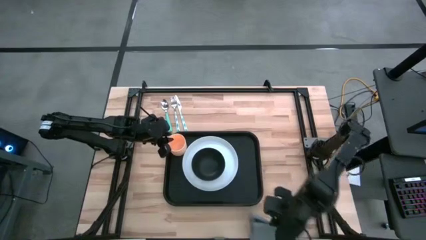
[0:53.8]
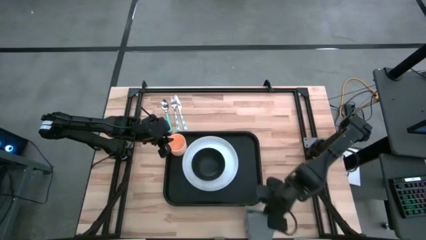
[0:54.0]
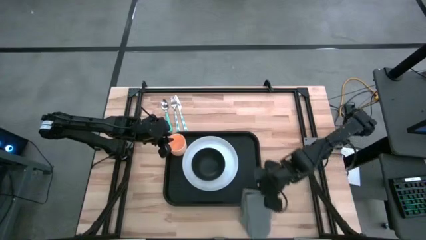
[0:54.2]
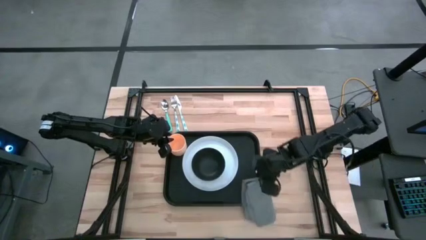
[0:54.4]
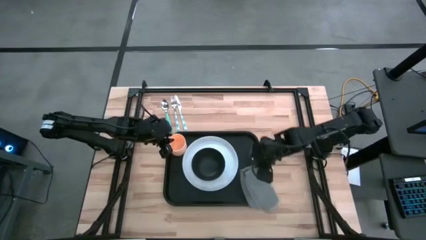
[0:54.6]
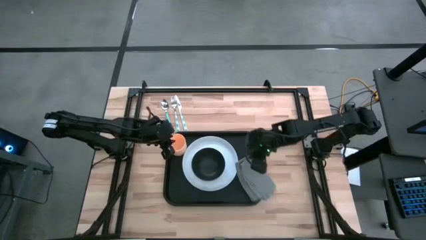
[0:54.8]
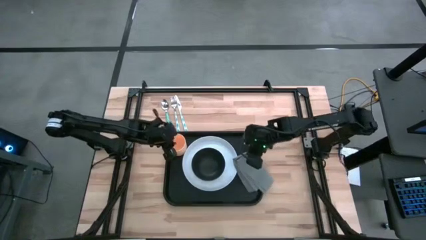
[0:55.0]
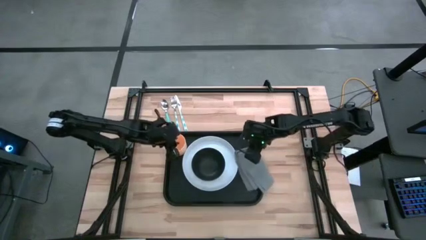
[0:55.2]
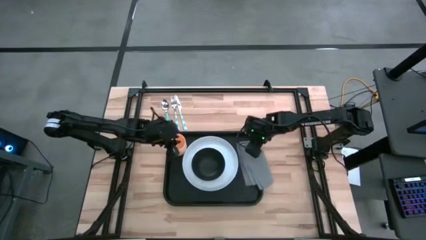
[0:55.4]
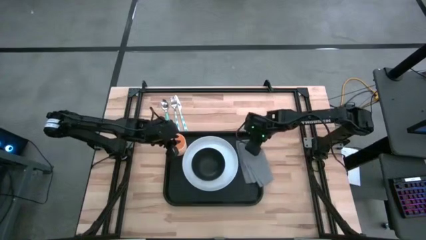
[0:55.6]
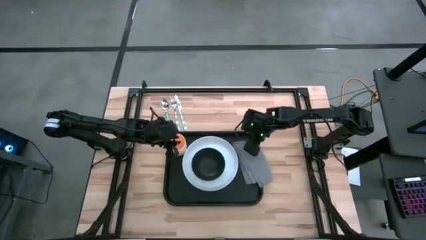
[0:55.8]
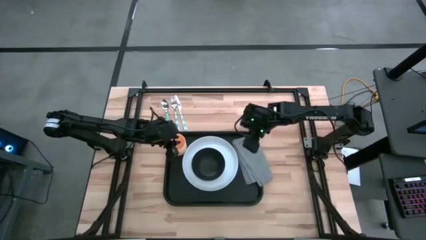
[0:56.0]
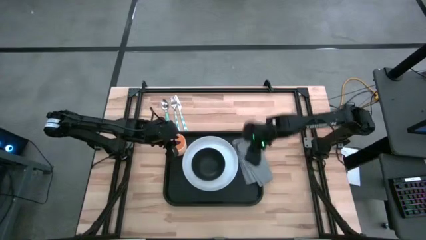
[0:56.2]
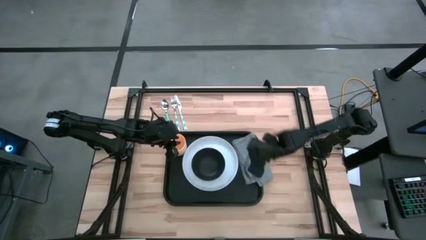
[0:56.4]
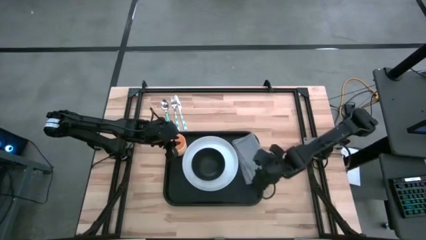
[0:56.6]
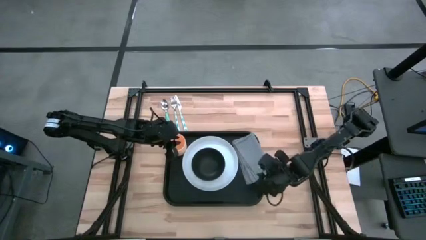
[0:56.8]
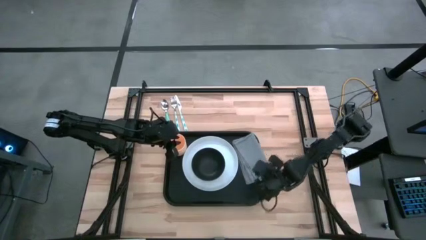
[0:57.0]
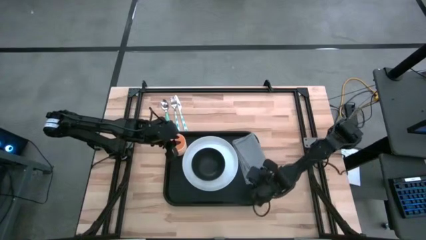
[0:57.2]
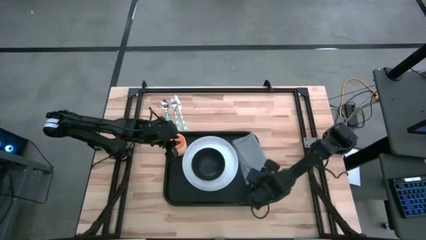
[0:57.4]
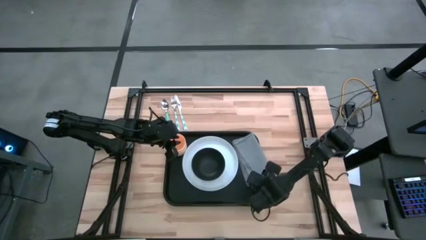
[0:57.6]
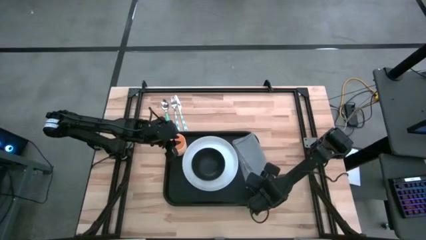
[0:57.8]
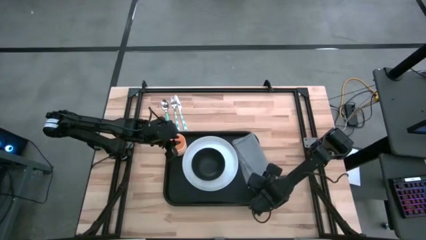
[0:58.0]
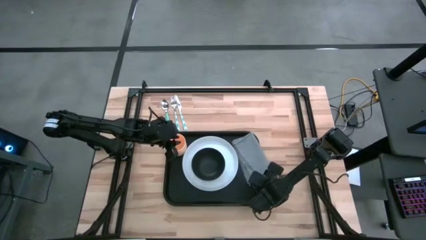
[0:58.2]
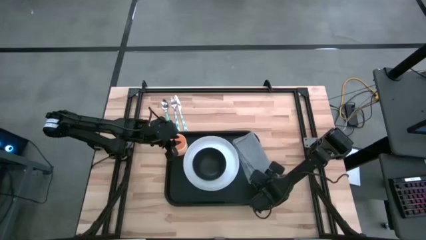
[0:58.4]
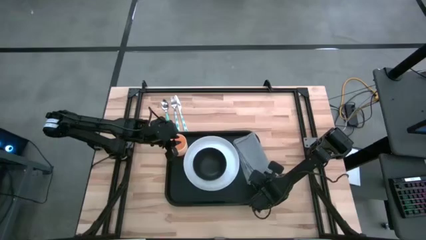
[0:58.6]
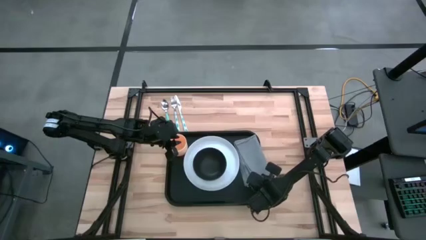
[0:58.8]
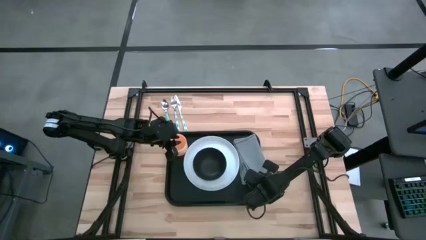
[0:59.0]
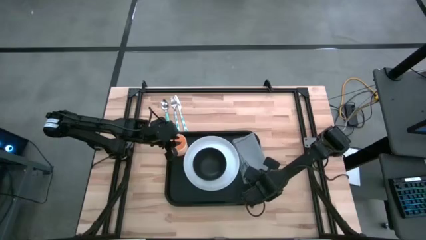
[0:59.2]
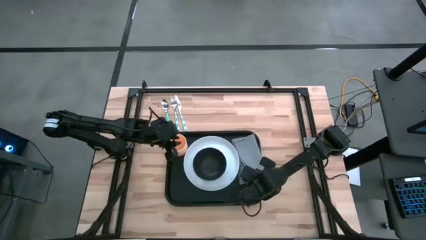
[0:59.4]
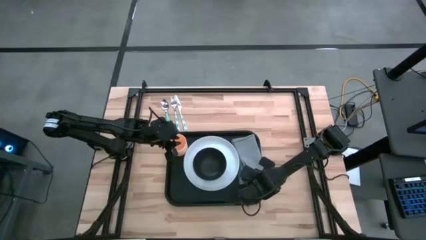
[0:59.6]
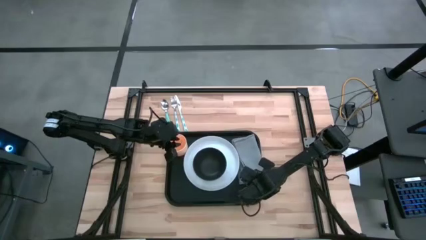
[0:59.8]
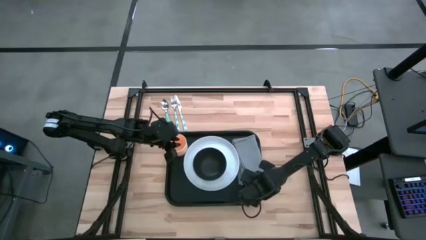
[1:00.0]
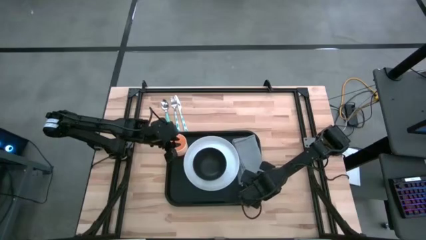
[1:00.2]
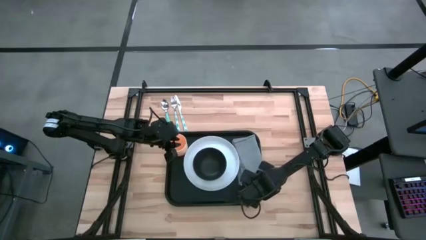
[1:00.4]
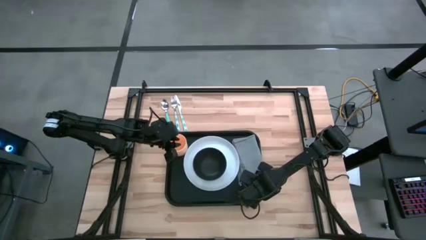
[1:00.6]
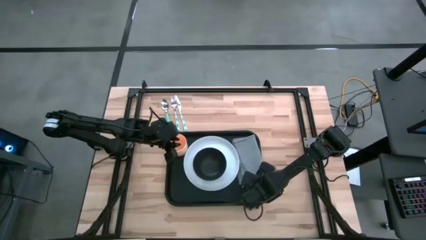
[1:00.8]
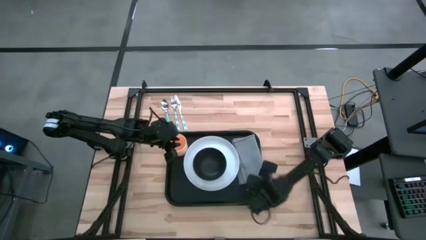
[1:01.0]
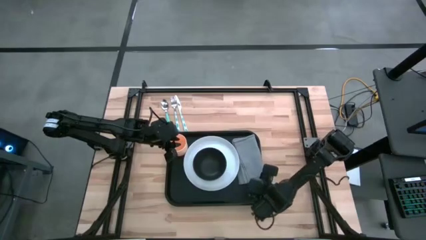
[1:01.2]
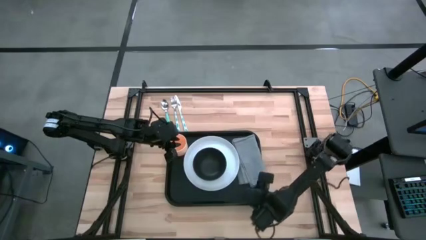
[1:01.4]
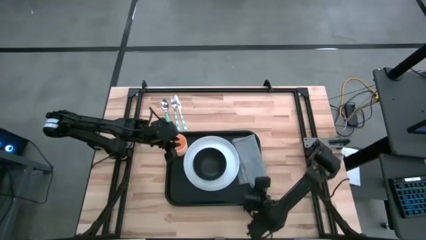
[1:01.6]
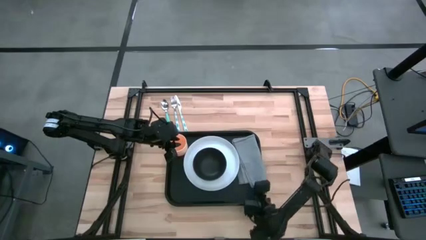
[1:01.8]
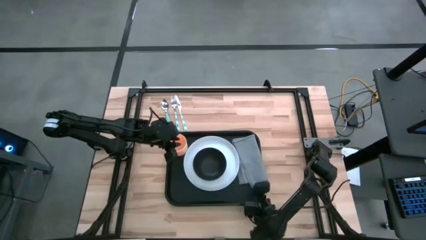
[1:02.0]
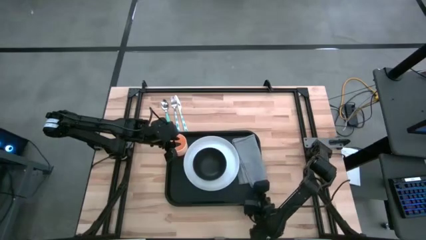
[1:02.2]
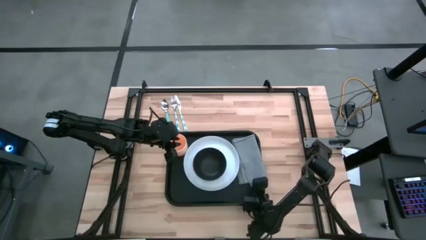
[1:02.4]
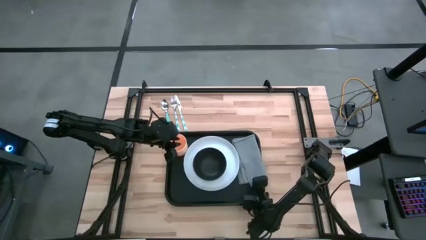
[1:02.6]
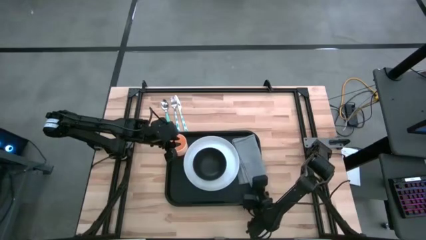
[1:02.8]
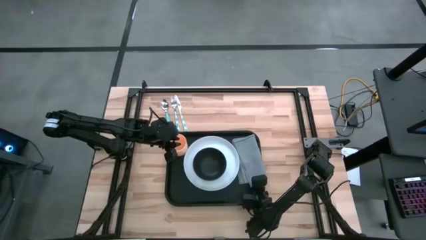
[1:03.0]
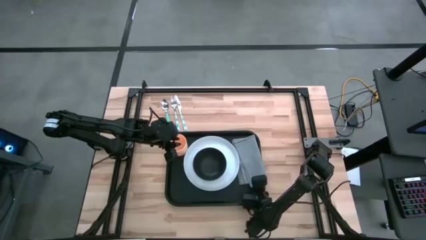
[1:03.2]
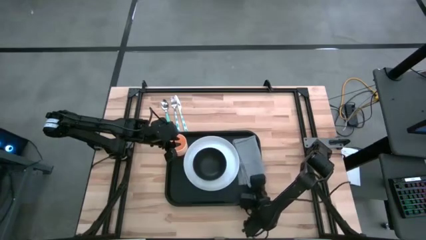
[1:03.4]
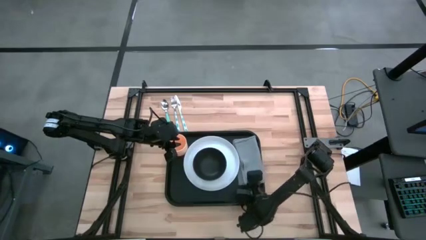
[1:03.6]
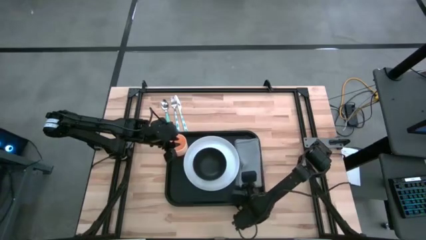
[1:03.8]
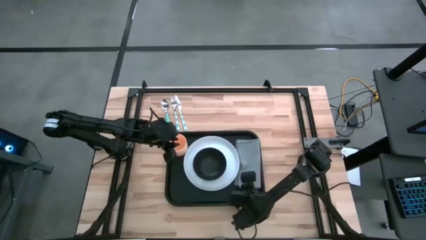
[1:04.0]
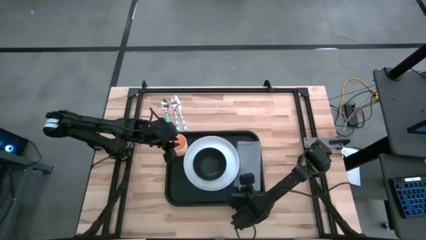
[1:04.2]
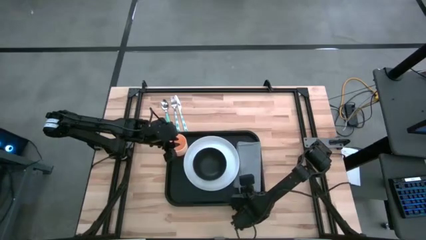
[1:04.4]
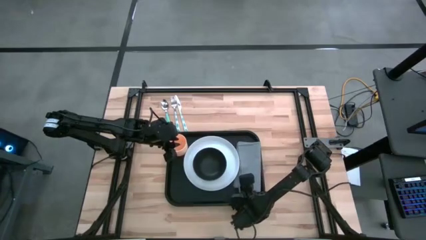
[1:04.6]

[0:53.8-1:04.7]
Task: Set up tray
Put the gray napkin to the right of the white plate on the black serving tray

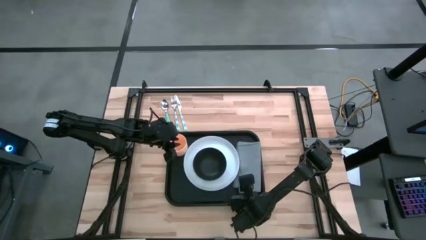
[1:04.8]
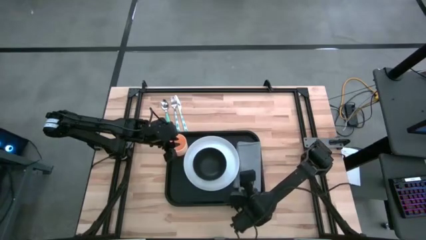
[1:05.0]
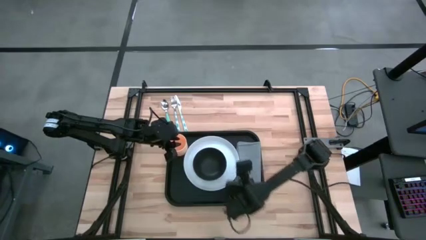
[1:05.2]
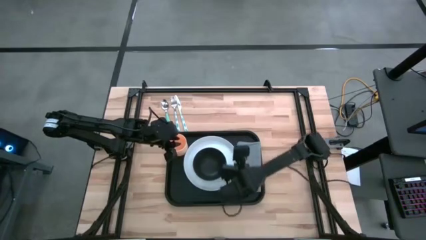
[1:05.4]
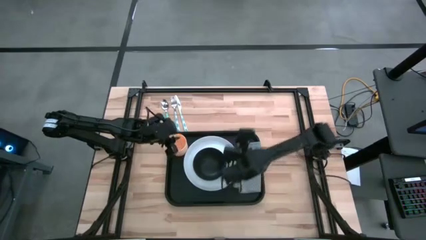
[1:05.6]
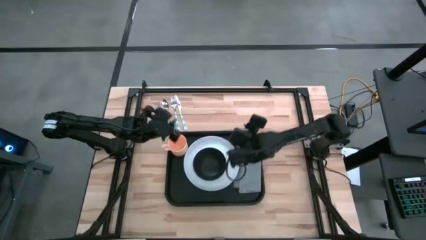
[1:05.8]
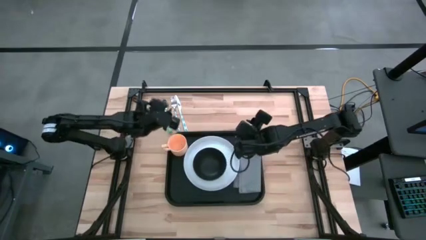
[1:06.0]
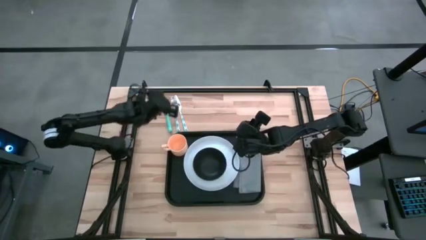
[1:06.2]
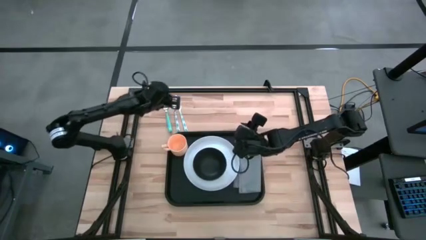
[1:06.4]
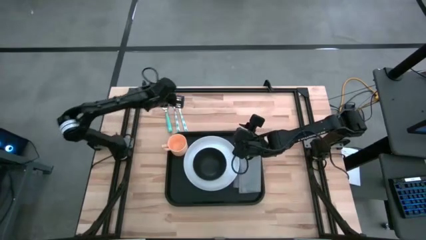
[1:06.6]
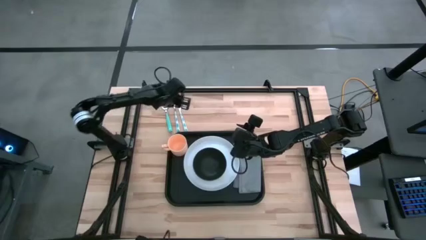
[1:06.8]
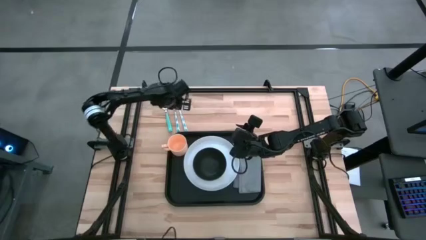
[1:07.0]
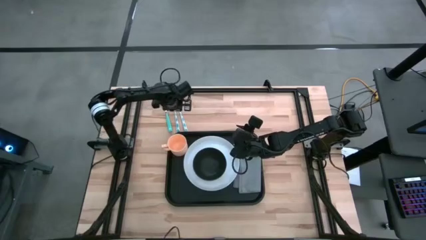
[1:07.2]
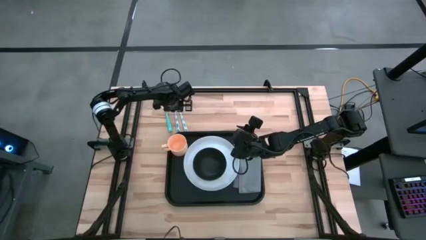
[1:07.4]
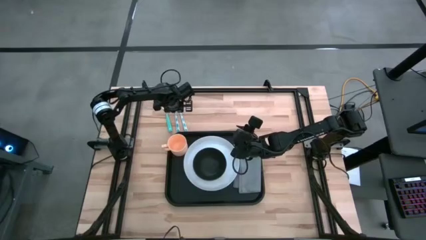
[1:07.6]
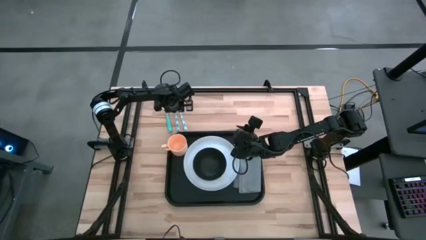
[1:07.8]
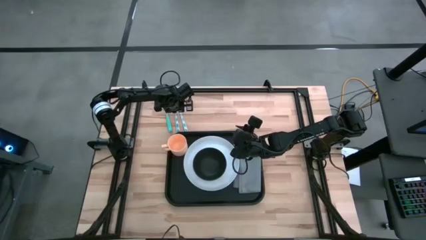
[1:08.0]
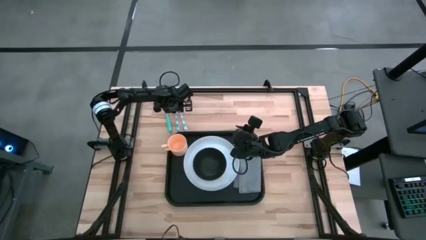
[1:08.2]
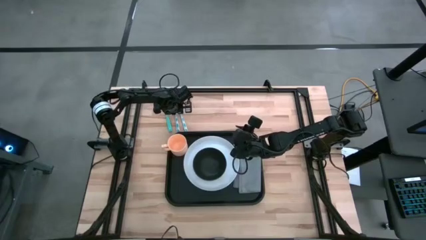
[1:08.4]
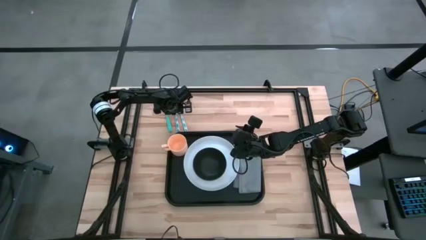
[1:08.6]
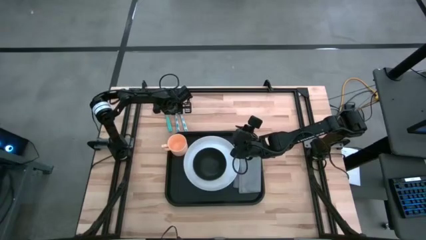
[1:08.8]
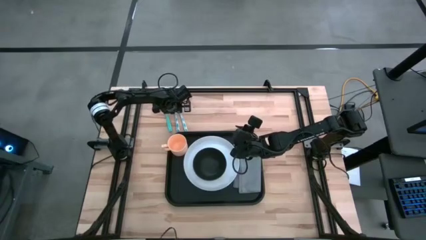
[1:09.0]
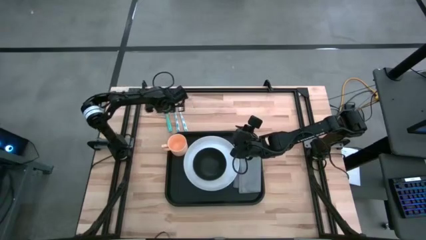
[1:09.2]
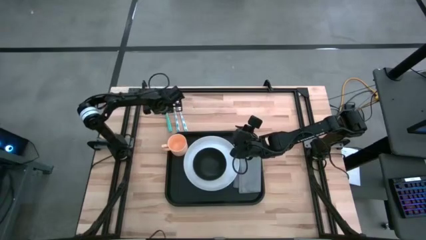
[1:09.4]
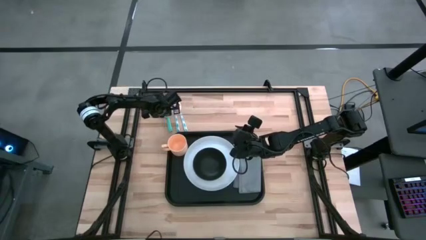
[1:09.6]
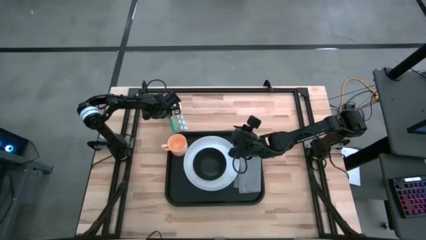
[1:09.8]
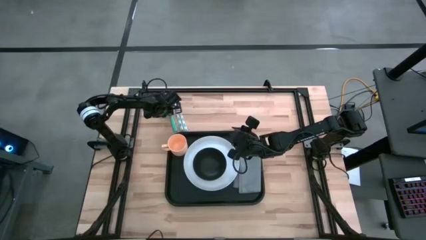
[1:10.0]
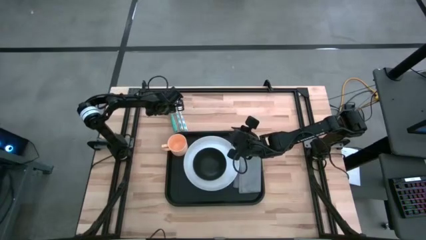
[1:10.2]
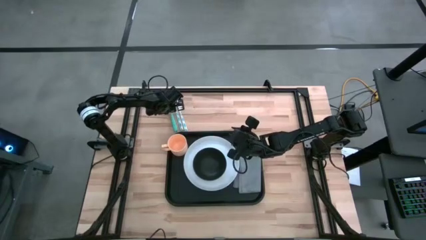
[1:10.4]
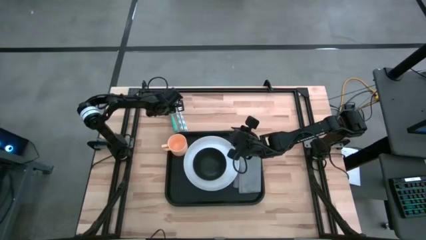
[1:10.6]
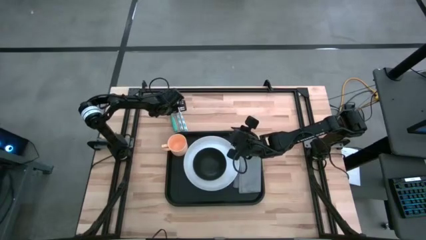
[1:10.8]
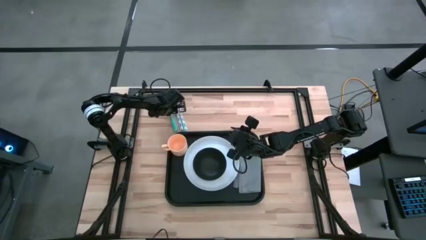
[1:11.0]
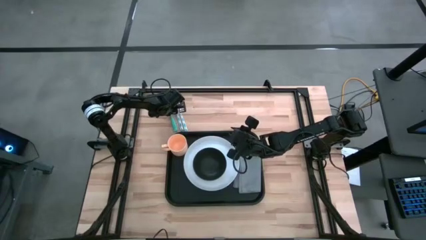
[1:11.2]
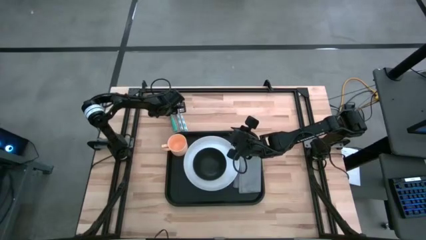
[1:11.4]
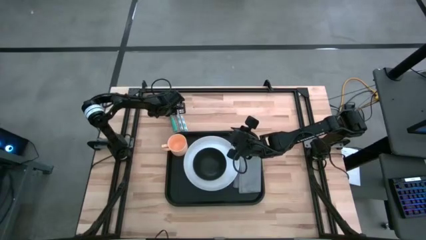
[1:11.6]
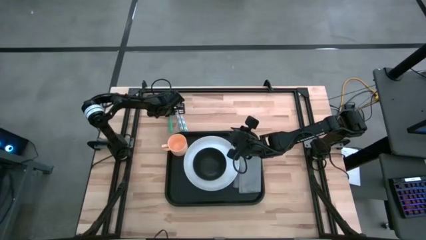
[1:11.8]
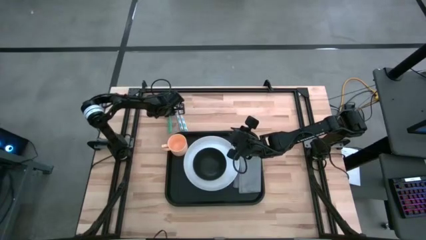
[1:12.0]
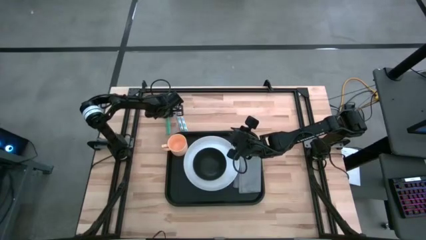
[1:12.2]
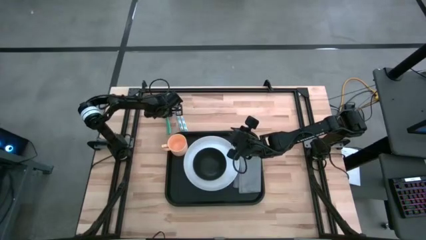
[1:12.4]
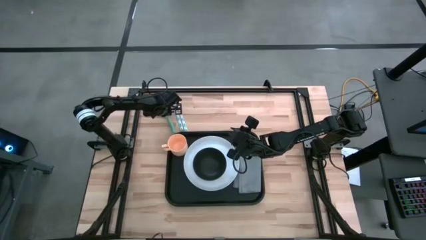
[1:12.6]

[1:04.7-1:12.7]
Put the green spoon on the gray napkin
